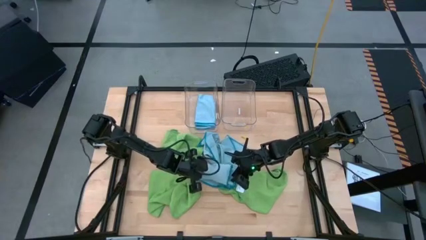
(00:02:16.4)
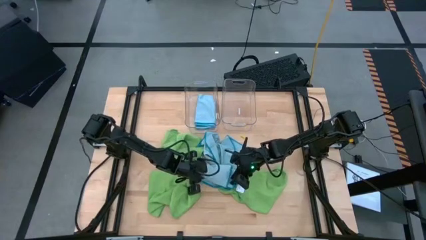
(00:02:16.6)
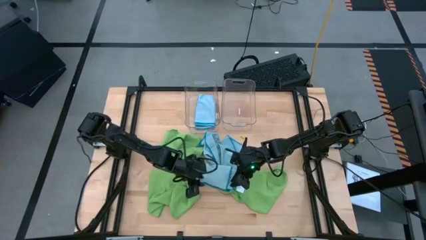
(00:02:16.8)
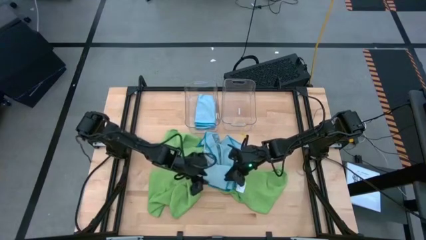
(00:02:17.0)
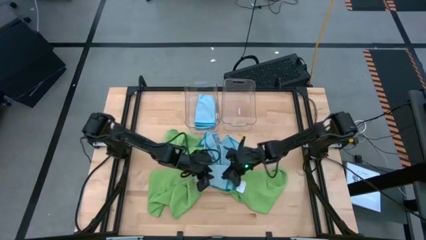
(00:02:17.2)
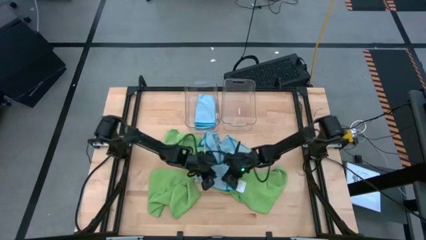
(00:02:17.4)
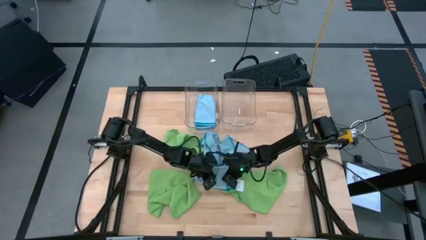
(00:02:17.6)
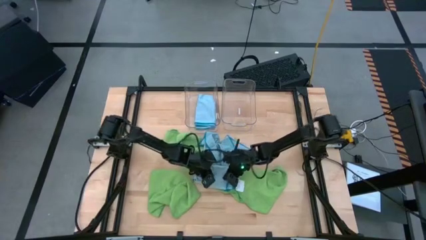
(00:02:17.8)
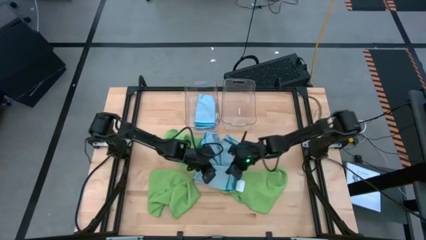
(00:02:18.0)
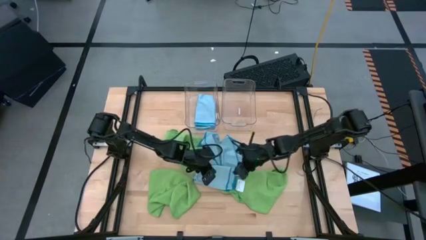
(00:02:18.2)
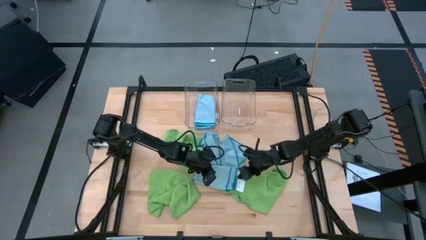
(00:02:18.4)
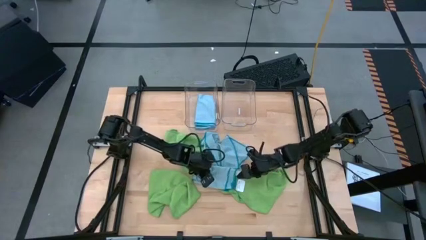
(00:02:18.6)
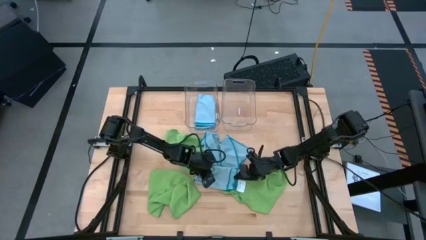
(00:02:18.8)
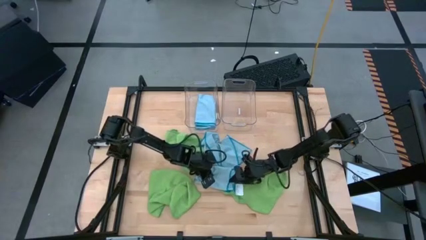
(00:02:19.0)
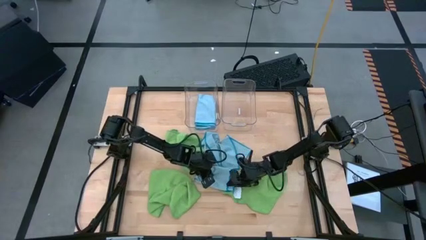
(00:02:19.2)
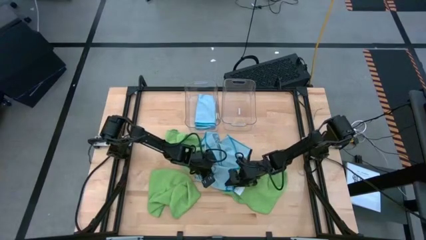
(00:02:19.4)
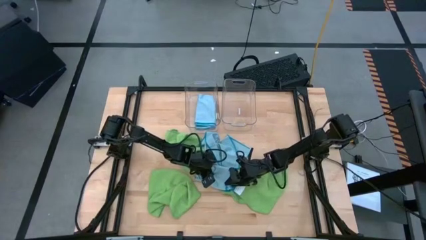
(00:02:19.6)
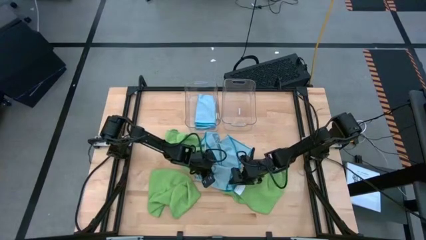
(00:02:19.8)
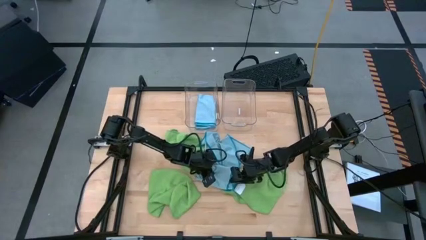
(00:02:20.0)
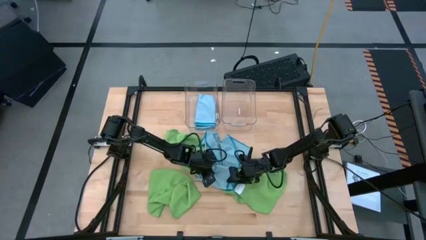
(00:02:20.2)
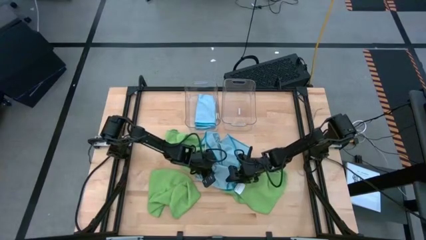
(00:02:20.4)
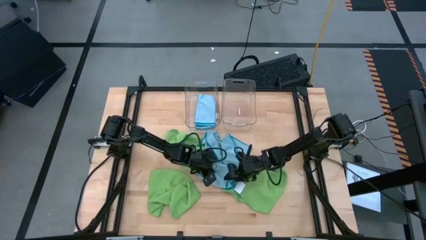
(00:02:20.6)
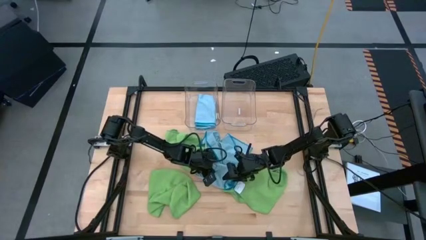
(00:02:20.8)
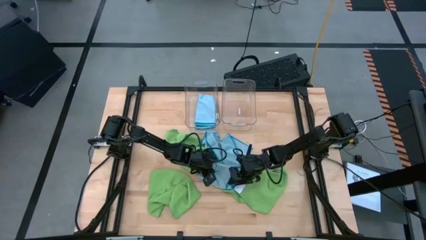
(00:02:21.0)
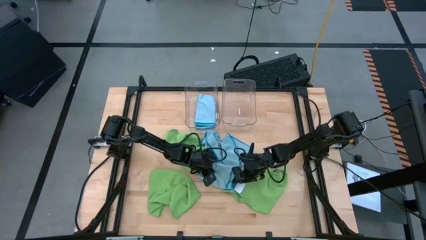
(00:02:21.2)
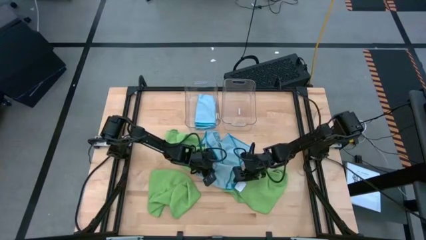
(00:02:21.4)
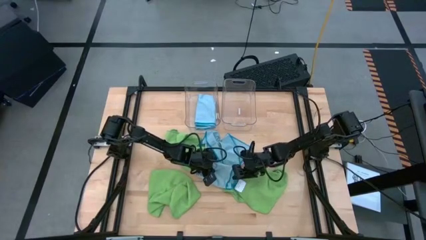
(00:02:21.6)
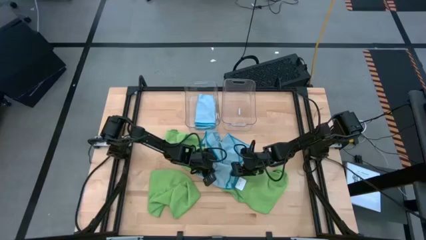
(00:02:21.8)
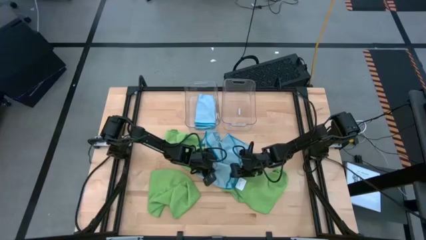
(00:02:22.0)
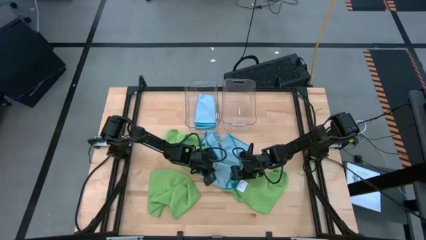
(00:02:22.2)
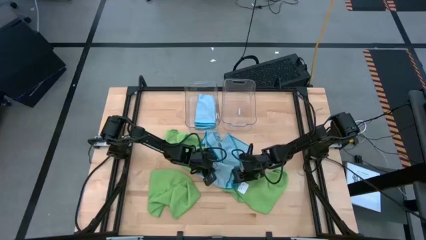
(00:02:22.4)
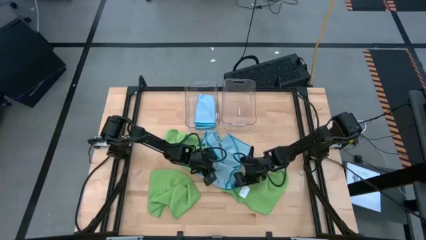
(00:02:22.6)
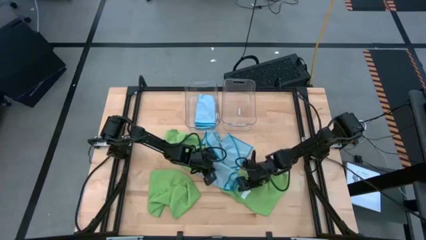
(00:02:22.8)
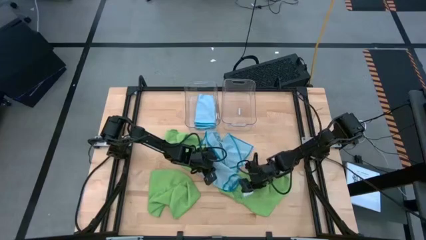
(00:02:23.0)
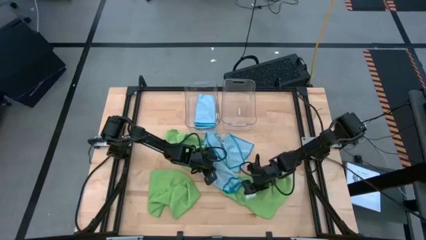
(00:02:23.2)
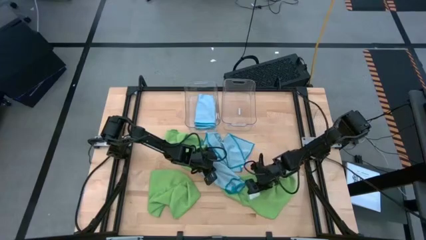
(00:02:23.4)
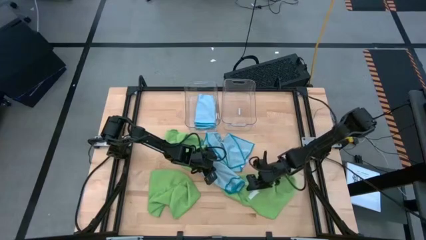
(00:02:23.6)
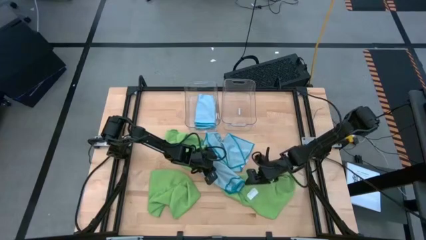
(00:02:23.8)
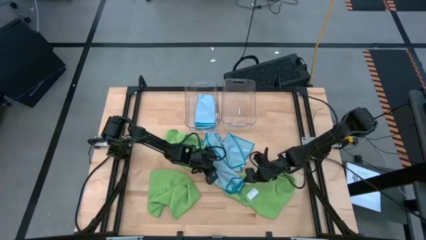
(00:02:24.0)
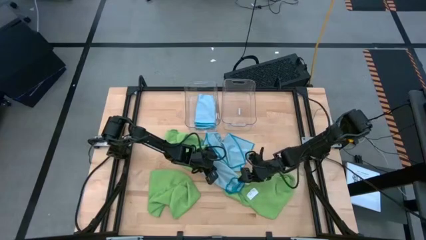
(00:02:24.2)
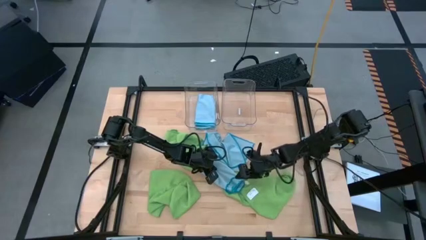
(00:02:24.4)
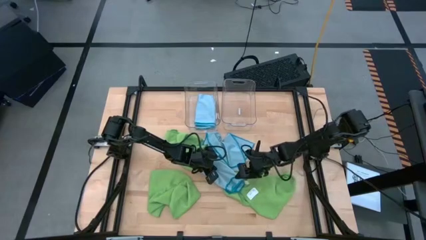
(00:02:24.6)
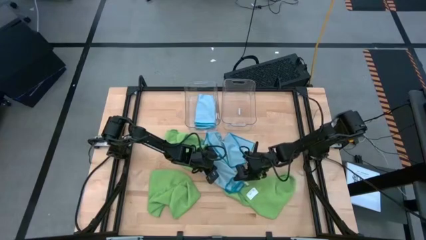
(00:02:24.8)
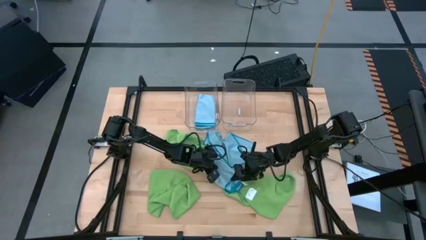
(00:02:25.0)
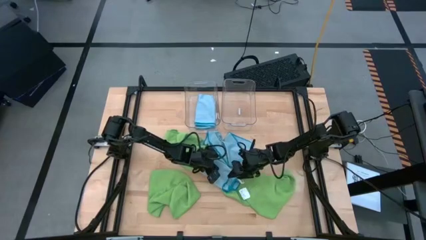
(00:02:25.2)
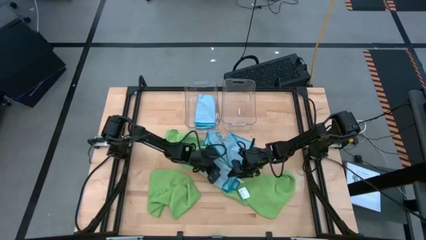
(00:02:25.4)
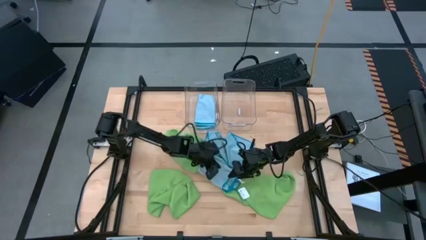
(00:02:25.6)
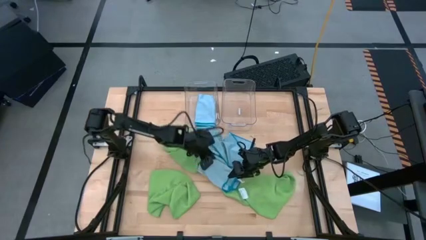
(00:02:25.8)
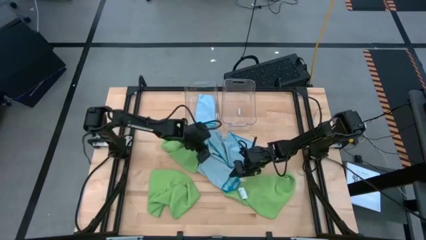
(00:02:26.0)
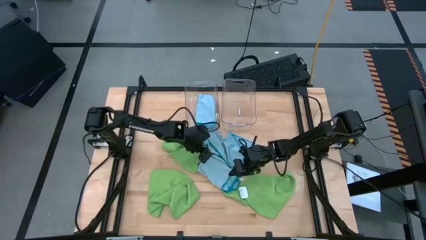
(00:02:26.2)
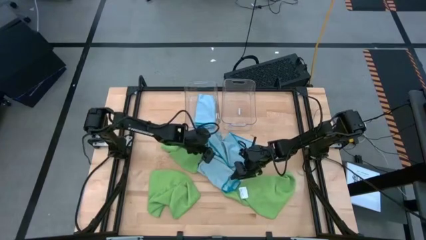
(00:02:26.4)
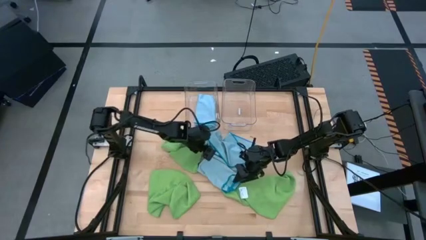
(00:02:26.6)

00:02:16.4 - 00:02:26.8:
Task: Fold microfiber towels
Stack the folded blue microfiber towel on top of the other blue microfiber towel in the left transparent bin
